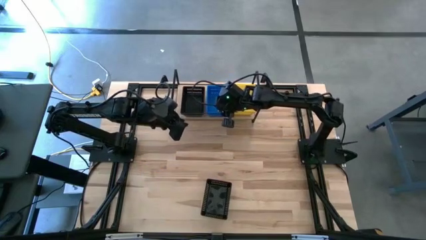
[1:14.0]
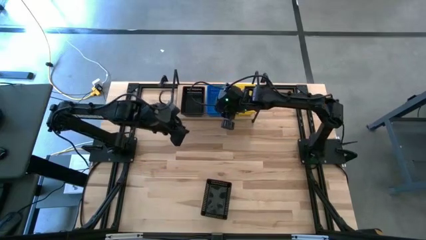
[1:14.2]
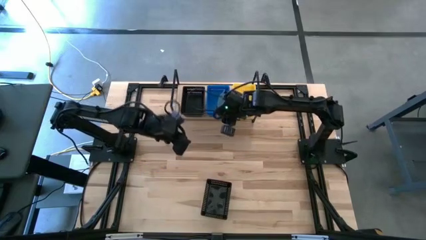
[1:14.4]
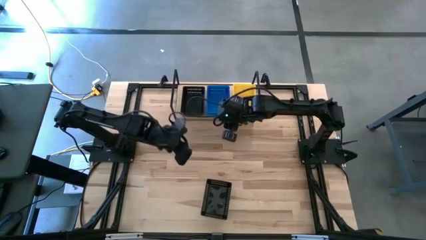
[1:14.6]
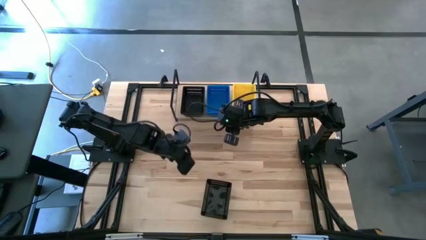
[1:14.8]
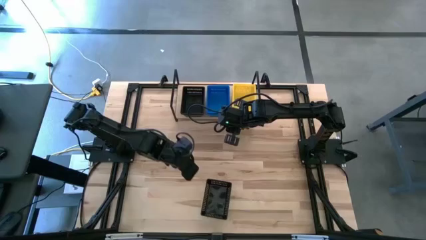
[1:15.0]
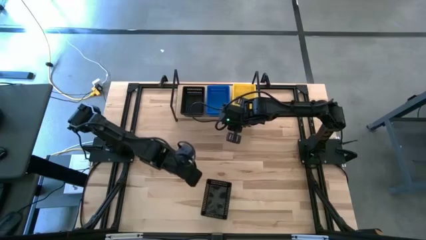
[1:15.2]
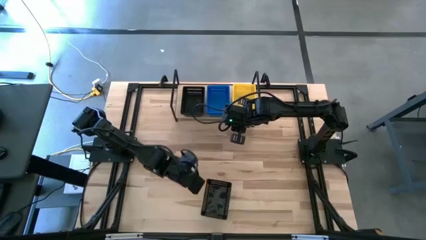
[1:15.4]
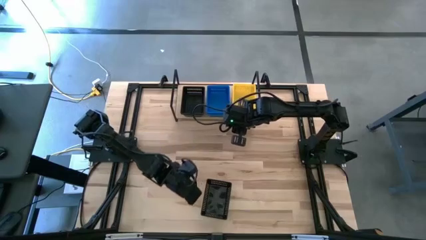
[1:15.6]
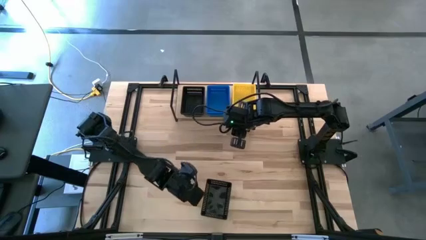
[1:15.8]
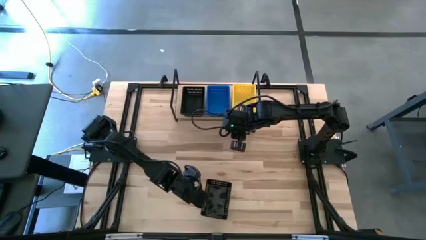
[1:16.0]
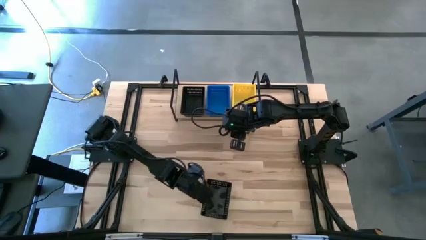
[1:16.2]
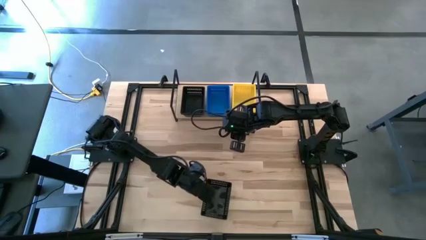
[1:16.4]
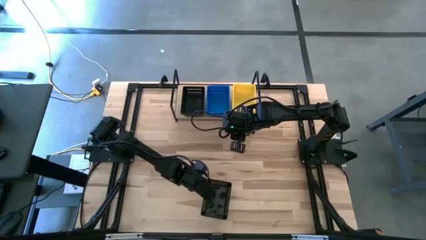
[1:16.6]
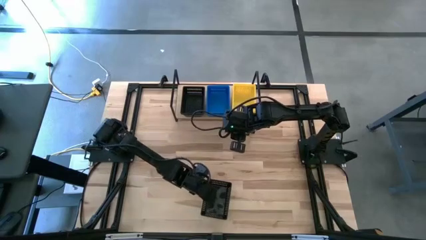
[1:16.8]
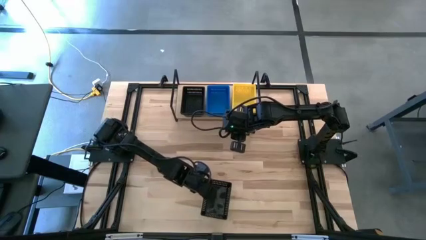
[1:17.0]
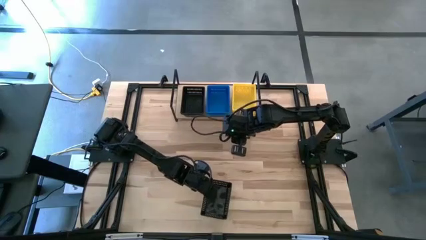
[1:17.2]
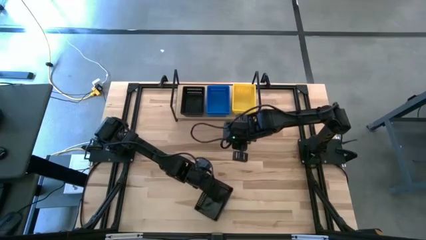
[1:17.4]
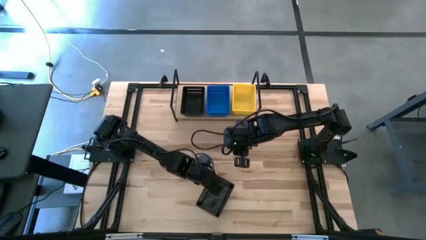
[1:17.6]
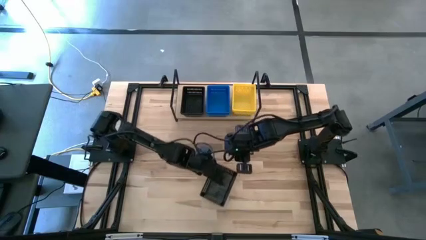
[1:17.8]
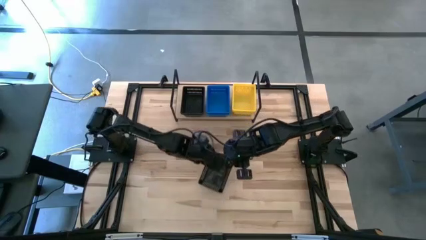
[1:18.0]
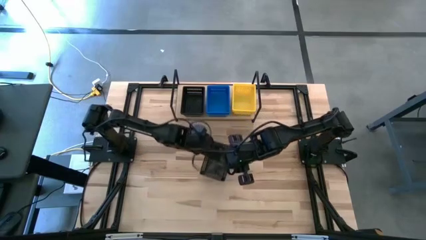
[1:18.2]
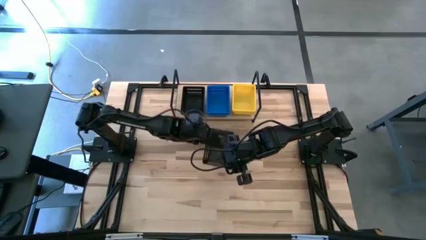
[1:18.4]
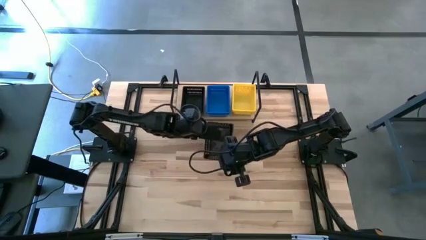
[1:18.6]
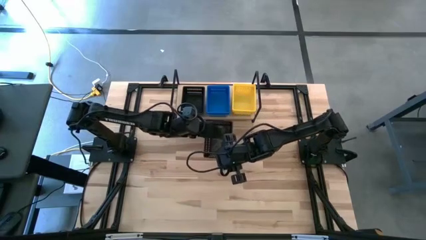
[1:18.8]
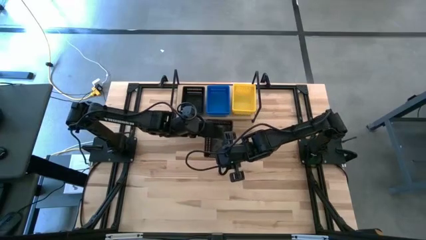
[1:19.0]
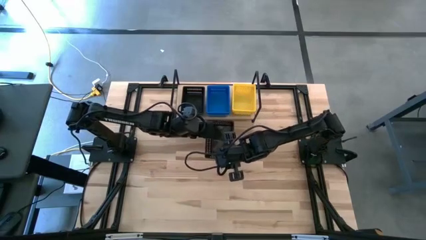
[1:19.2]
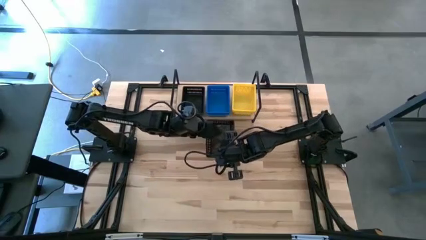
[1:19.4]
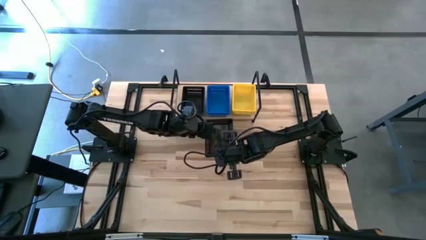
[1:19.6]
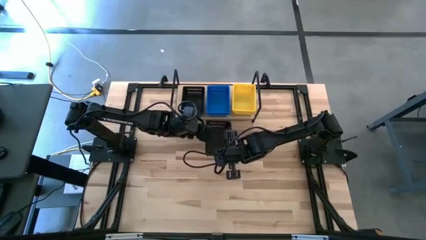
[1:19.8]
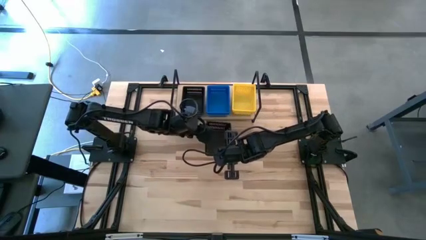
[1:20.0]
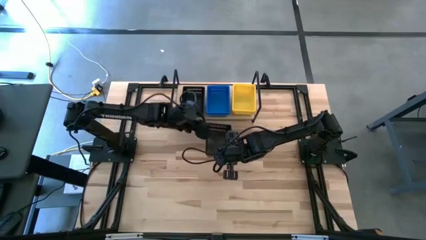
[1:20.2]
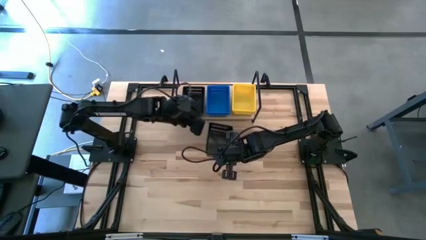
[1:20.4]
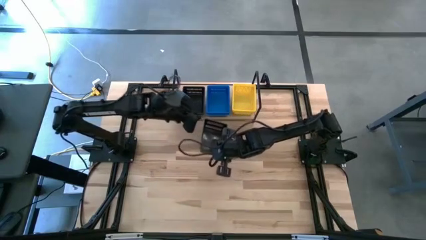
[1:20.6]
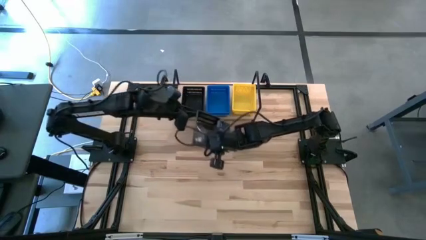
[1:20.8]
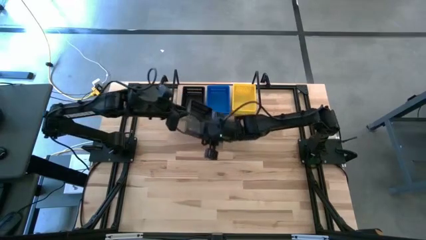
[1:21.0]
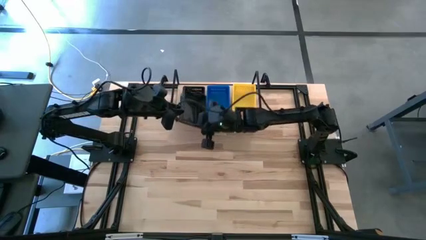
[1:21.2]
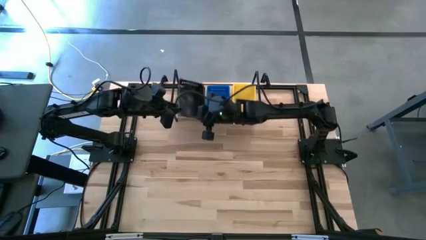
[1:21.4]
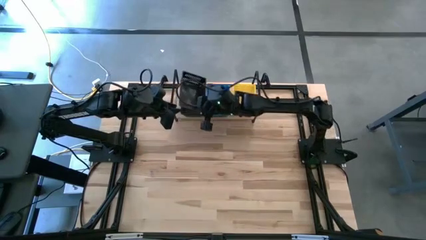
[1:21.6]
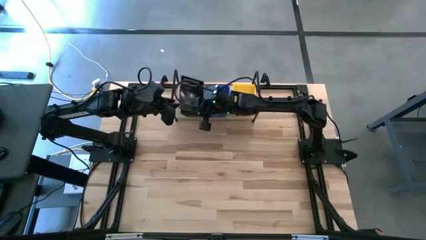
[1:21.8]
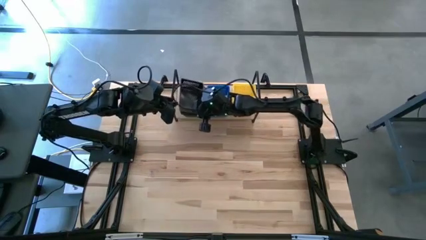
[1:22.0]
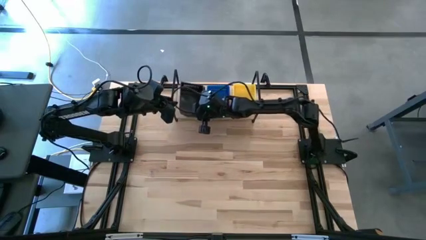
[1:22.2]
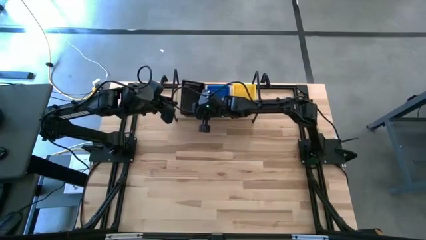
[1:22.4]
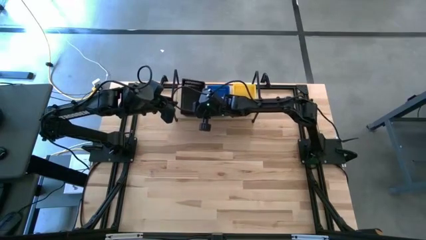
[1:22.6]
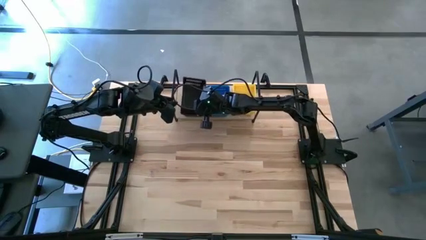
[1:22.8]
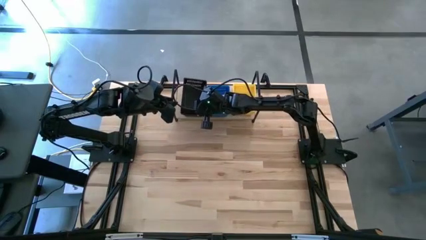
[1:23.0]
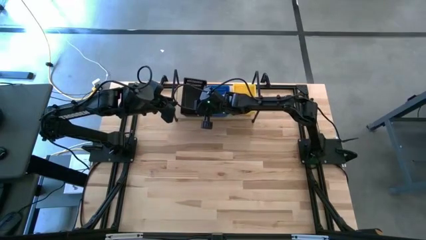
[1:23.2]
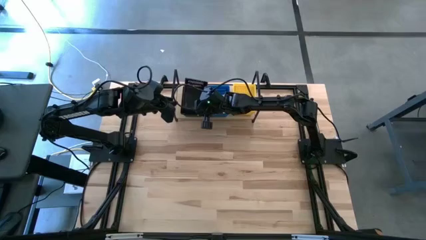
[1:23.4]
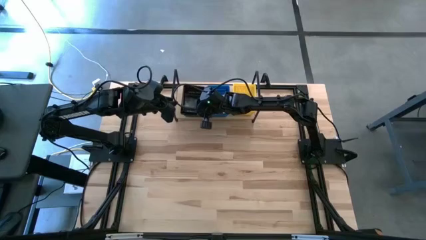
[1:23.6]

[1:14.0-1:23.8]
Task: Stack baskets on shelf by color
Stack the black bin on top of the black bin on the shelf

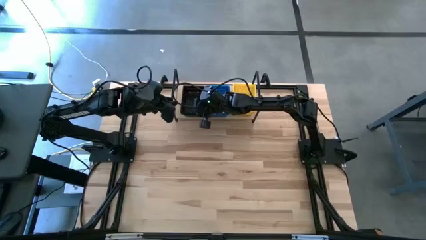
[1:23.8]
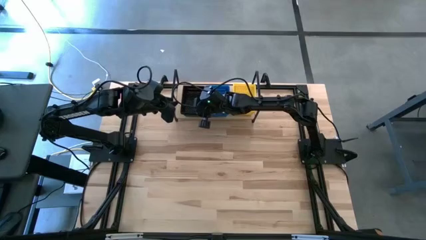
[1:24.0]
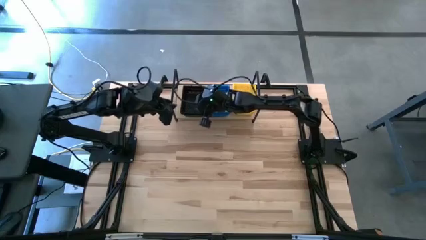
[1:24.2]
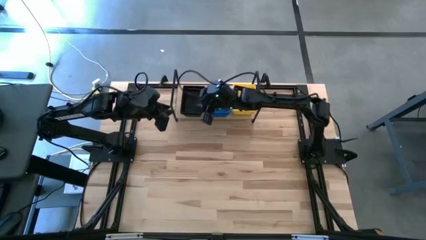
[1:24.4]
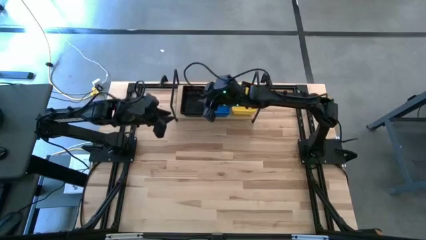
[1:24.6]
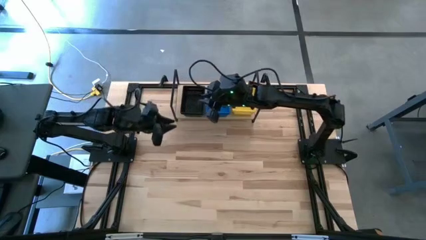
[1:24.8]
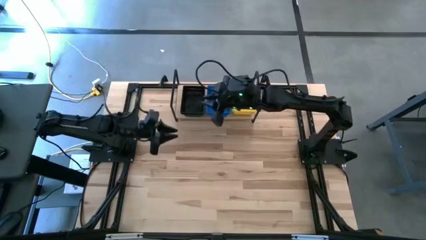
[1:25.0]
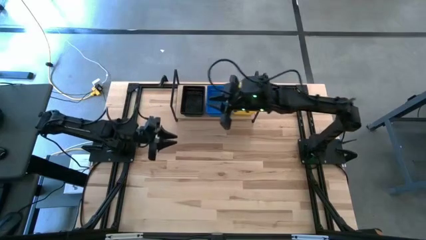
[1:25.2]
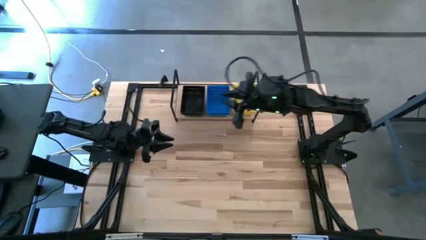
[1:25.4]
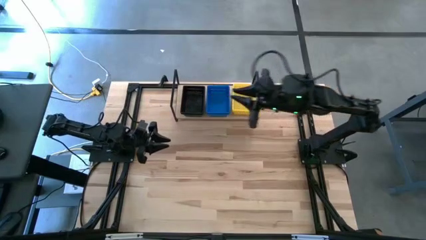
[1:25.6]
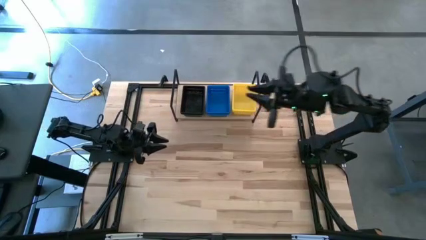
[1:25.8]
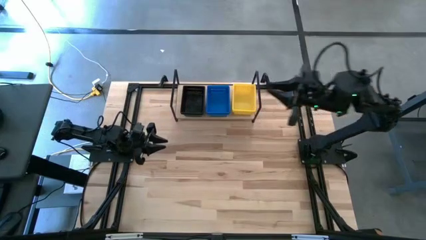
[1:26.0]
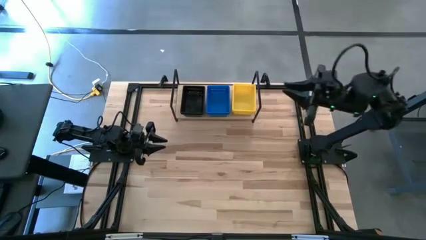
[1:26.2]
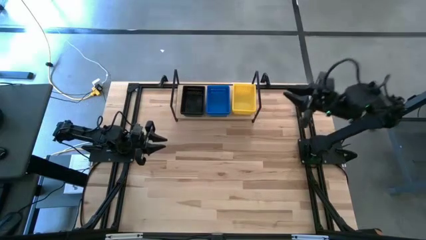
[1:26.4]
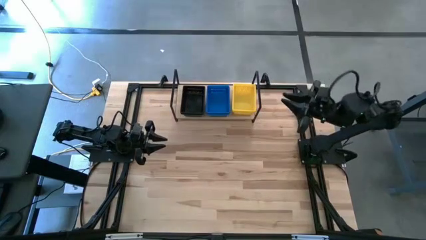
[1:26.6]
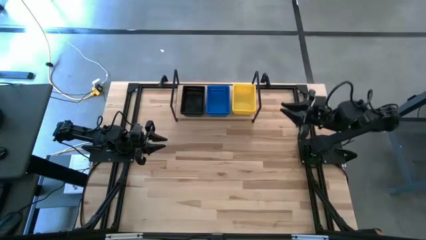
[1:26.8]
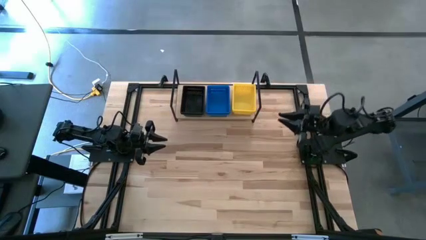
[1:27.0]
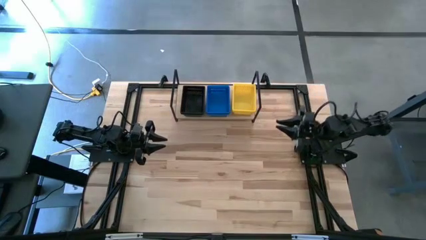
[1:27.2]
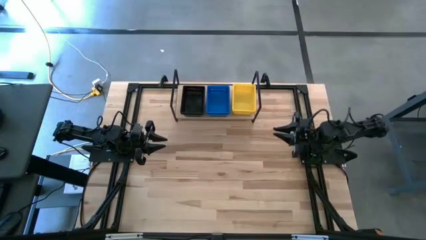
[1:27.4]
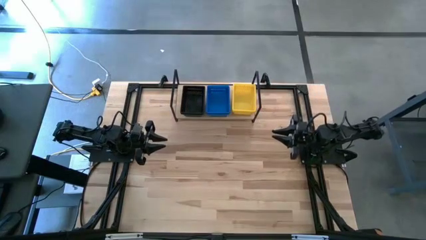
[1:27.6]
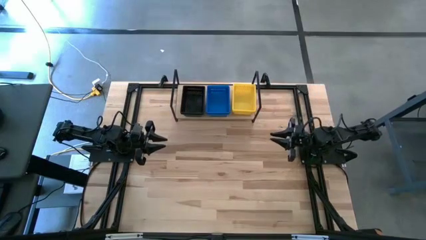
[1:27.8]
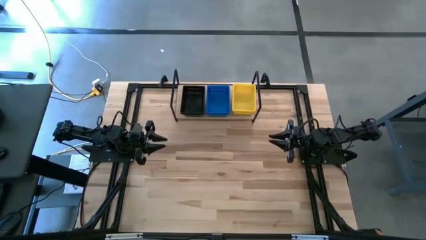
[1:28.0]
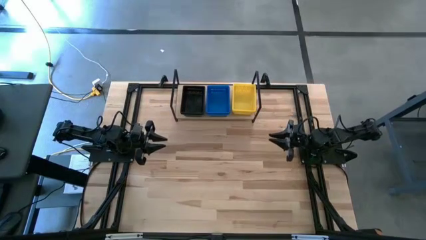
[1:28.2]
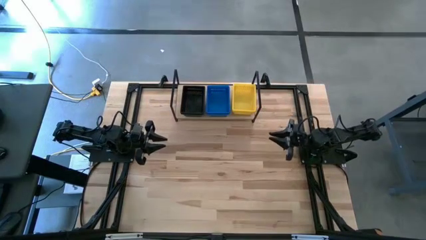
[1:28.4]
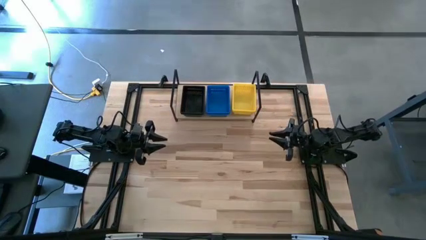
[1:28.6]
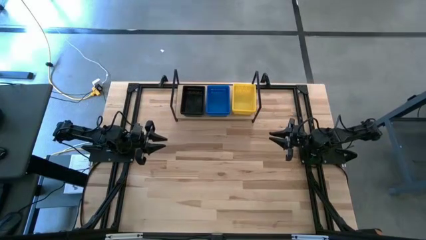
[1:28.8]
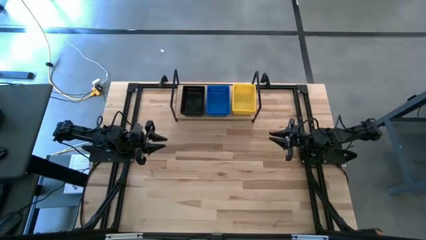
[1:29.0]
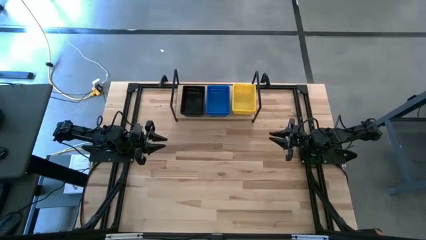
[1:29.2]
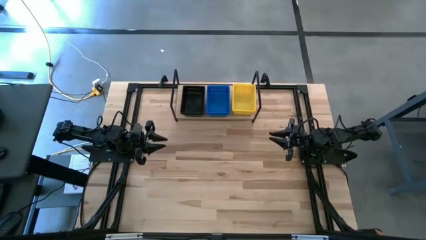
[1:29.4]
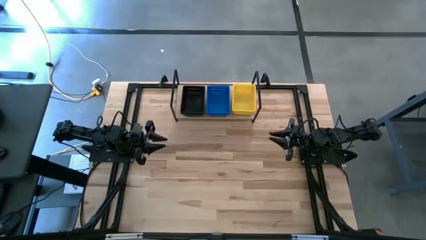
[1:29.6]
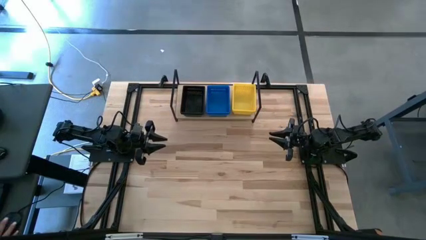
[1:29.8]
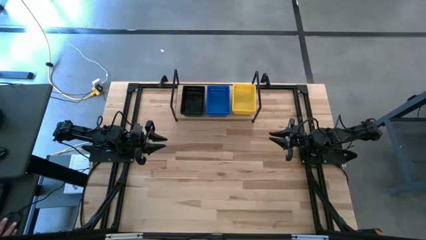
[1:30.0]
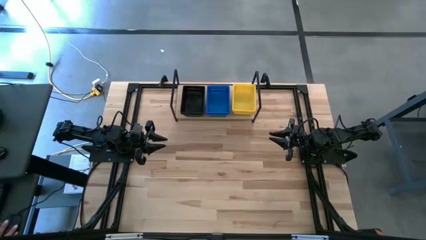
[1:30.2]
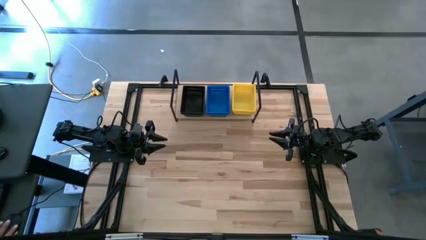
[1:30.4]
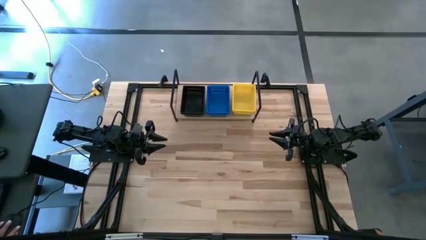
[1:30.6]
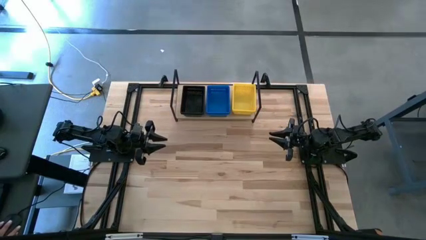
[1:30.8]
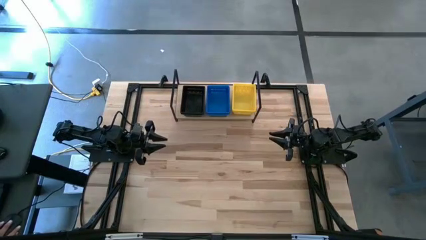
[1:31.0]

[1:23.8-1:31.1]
Return to Home Position
